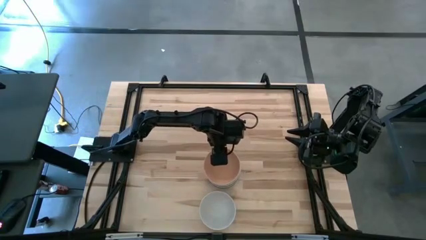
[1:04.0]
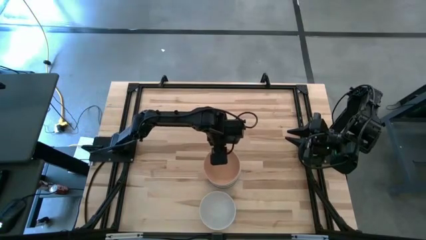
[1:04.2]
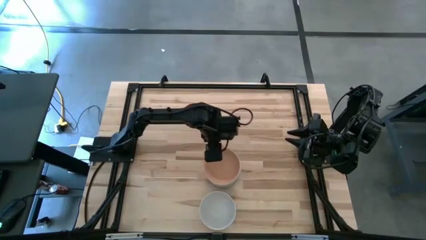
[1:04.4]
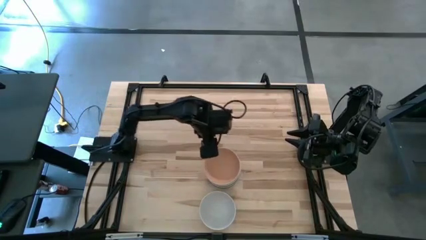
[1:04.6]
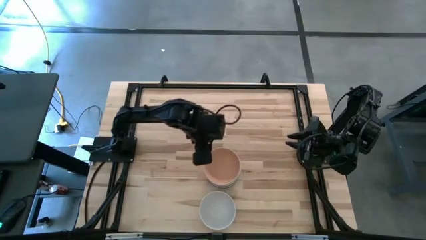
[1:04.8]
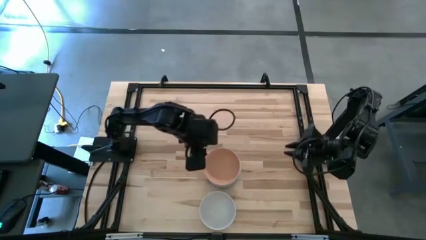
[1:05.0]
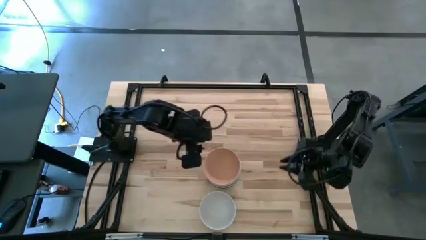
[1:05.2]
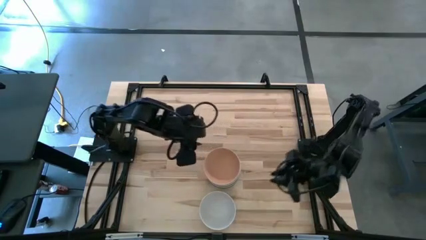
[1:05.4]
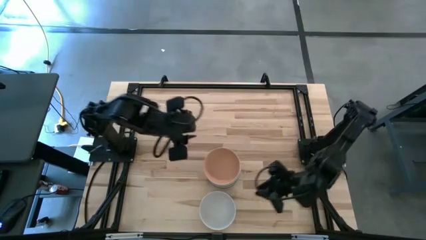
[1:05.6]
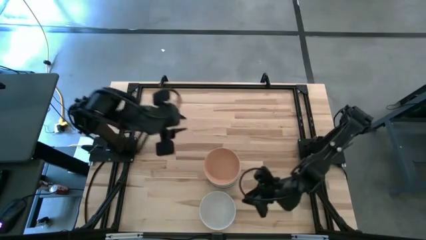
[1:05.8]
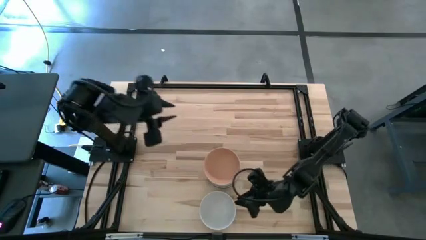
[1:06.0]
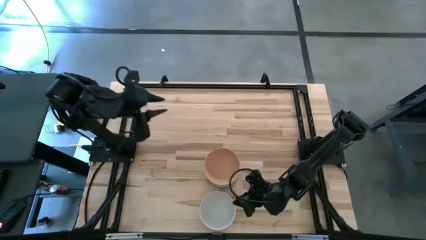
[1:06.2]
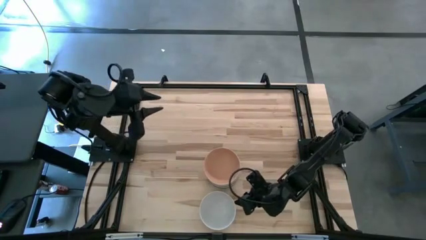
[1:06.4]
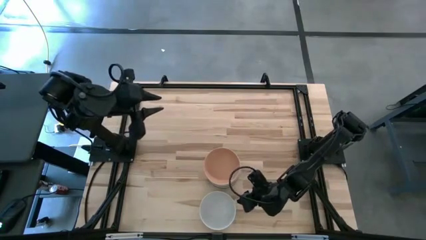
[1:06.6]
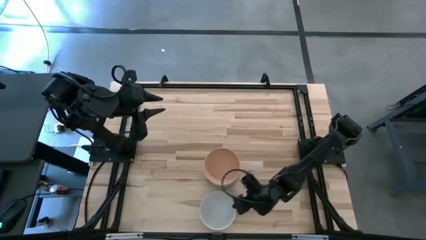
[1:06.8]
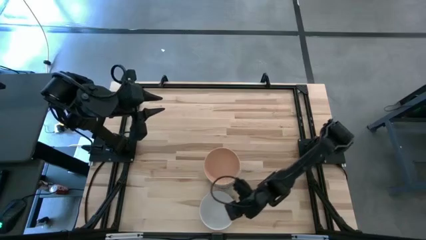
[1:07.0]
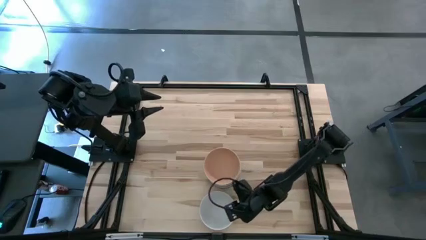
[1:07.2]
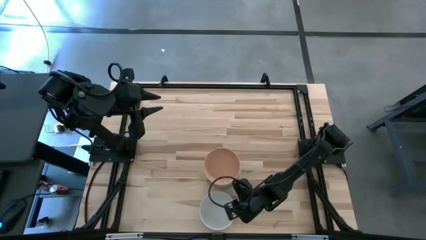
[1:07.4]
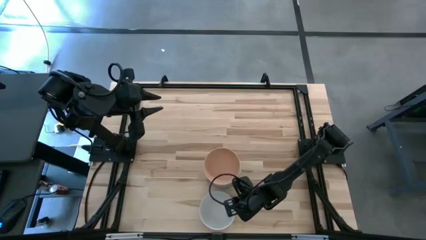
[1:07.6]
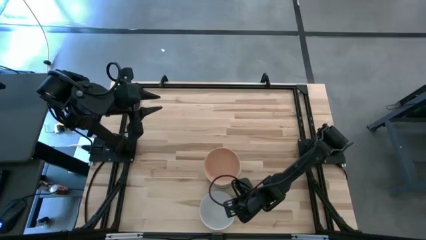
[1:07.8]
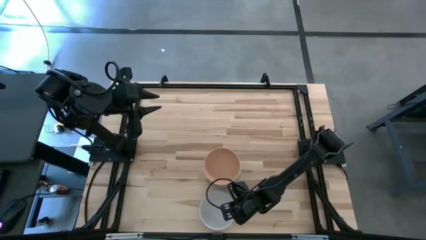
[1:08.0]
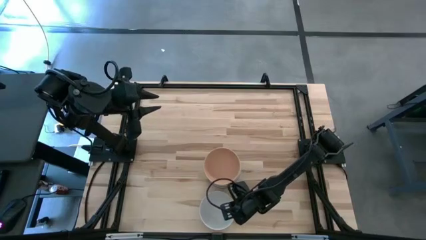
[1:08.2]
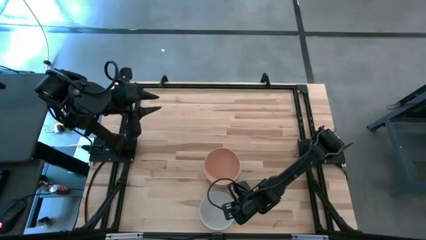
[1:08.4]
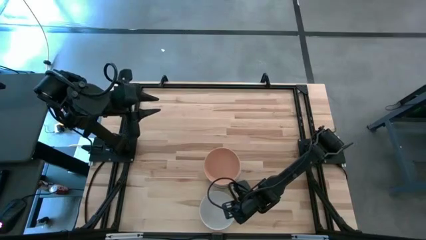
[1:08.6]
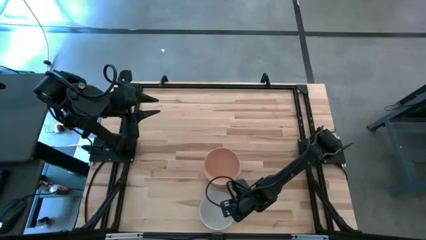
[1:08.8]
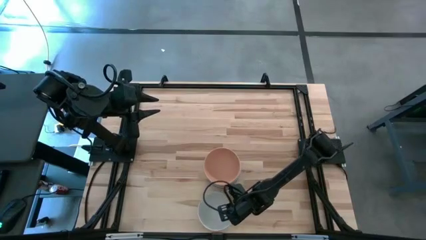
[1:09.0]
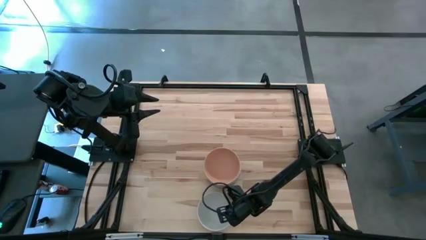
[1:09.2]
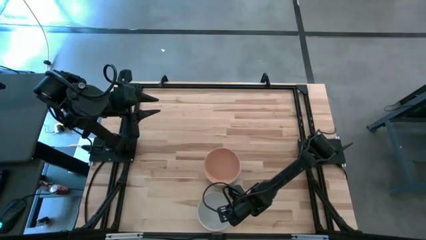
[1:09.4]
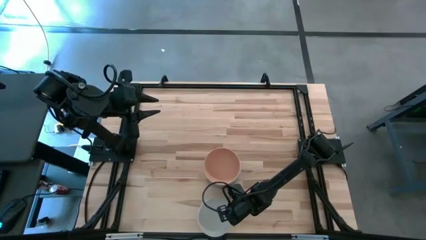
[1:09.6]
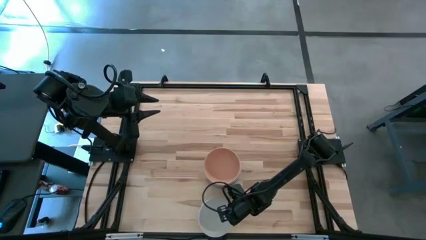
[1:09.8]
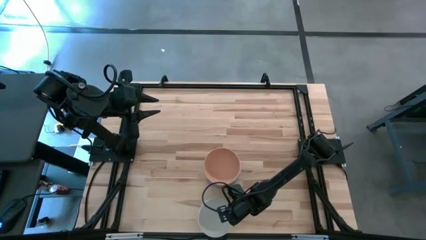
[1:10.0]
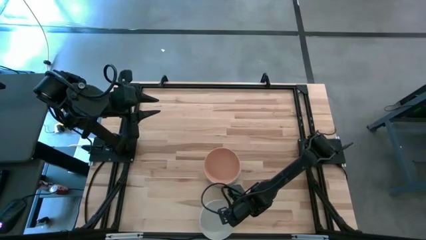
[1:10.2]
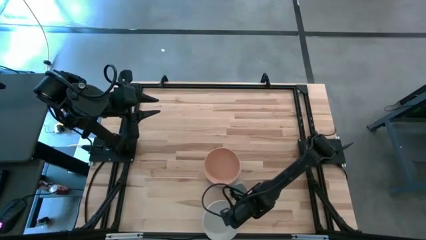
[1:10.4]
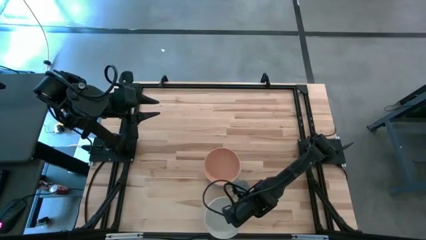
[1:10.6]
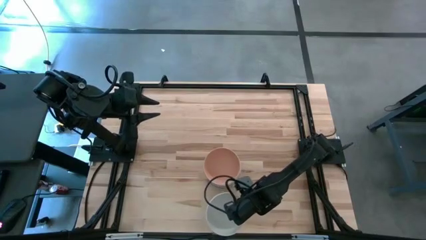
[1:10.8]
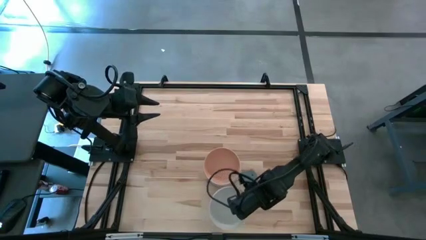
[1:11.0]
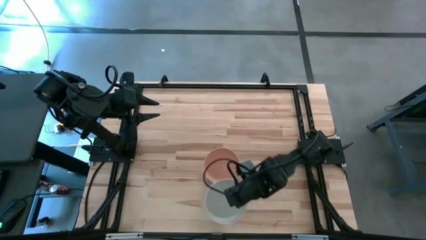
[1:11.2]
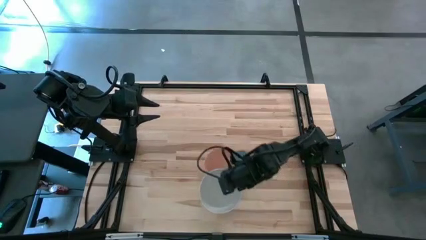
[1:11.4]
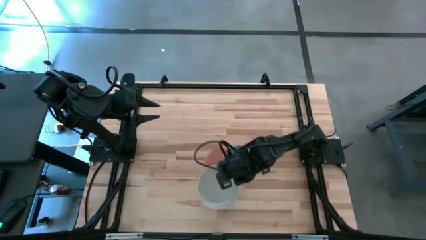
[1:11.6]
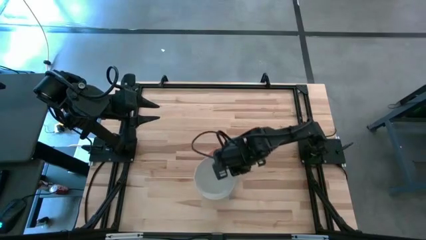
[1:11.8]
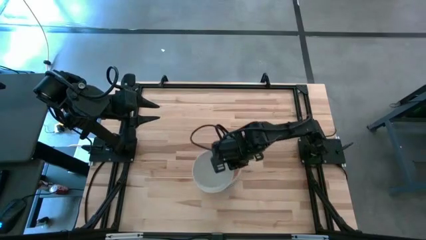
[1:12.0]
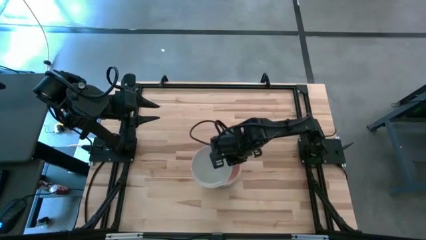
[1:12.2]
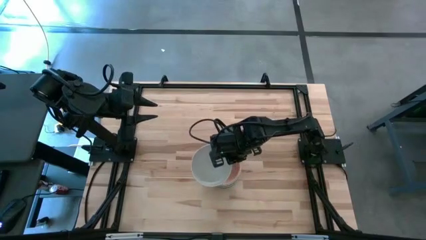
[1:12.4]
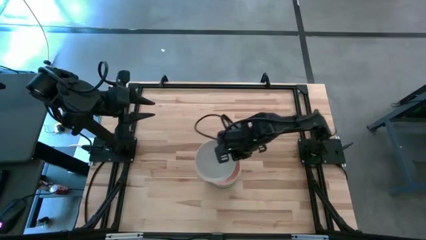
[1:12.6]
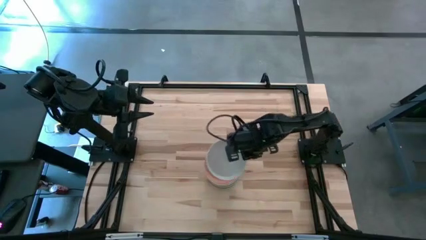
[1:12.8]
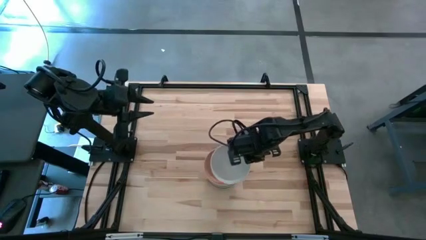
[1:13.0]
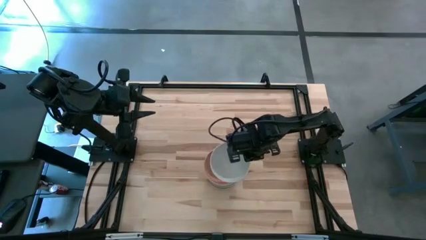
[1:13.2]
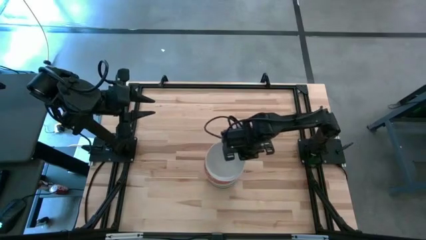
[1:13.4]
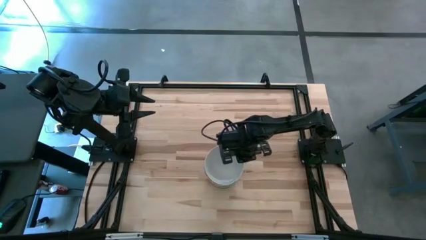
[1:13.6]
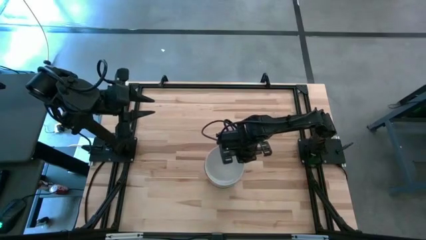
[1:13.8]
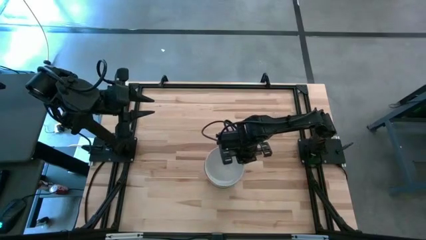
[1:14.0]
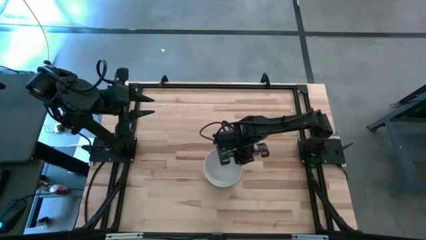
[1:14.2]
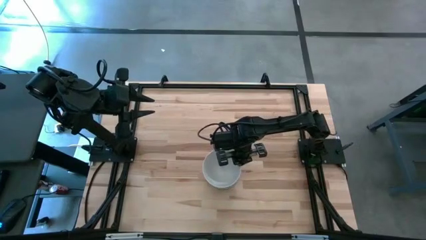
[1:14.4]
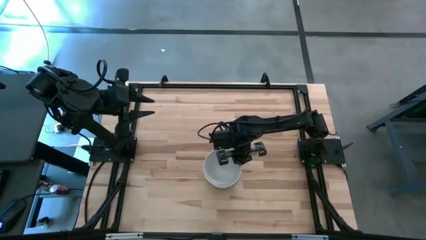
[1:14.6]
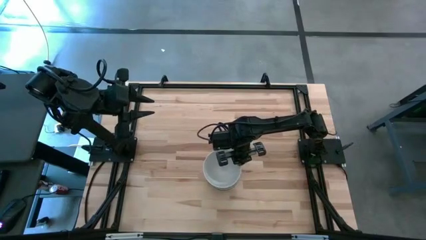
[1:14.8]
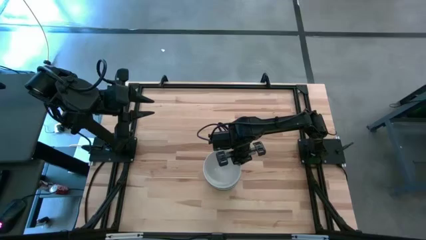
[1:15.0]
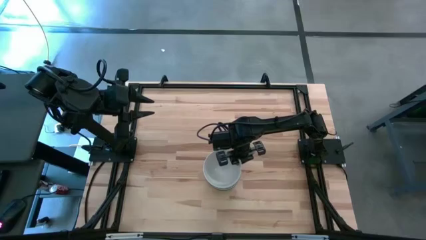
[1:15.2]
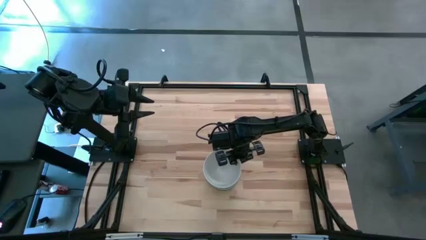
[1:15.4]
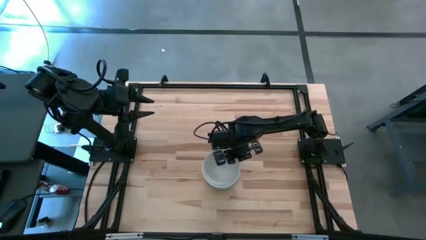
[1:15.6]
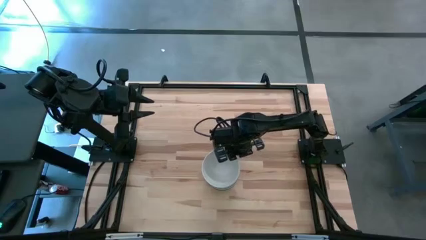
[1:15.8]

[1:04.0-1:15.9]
Task: Nest bowls inside each other
Stack the white bowl on top of the light orange bowl
